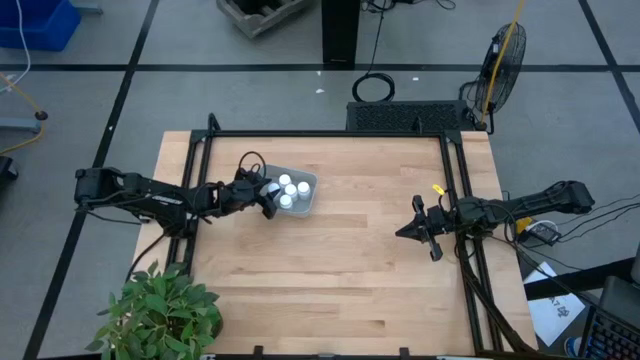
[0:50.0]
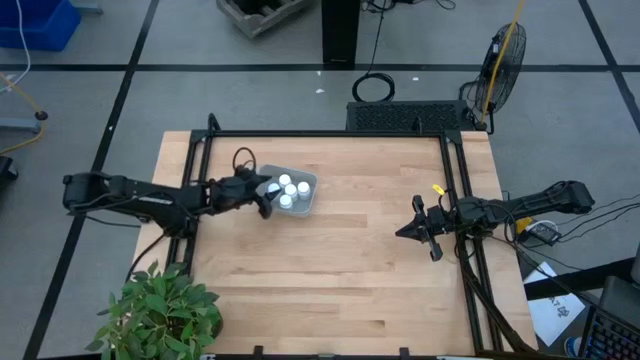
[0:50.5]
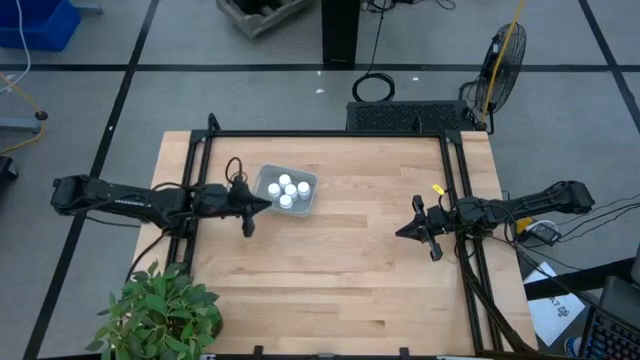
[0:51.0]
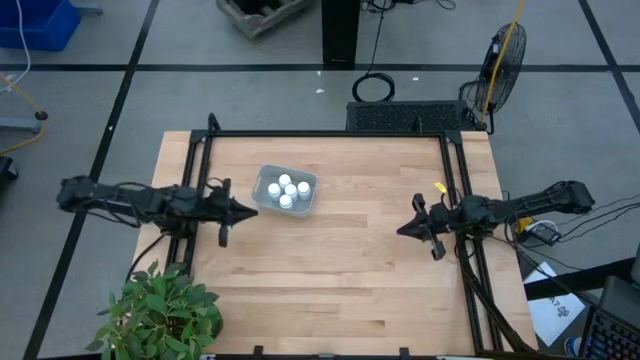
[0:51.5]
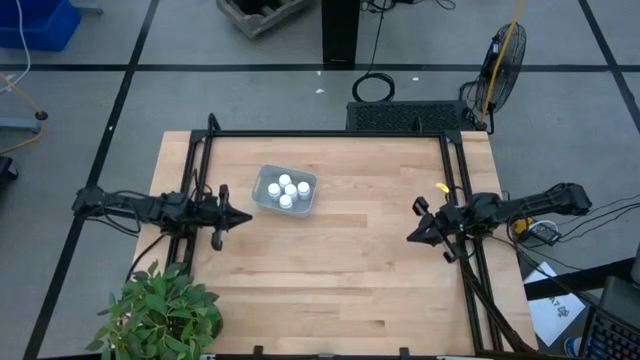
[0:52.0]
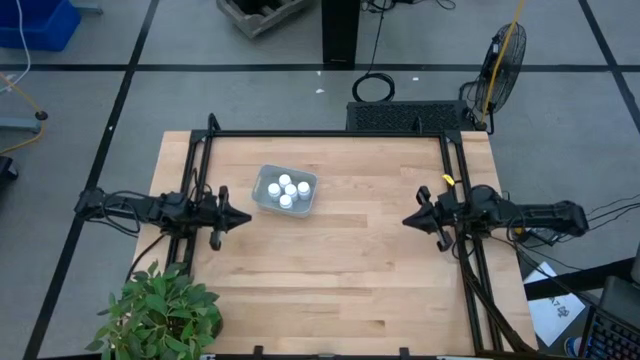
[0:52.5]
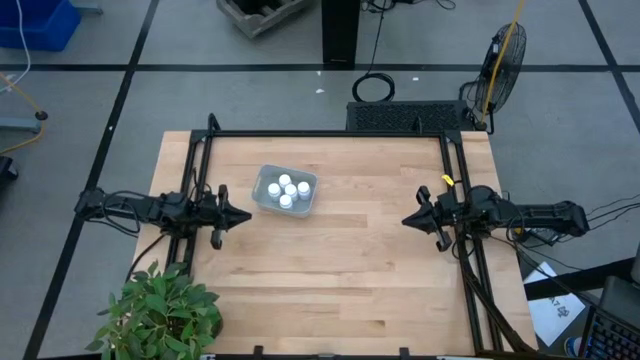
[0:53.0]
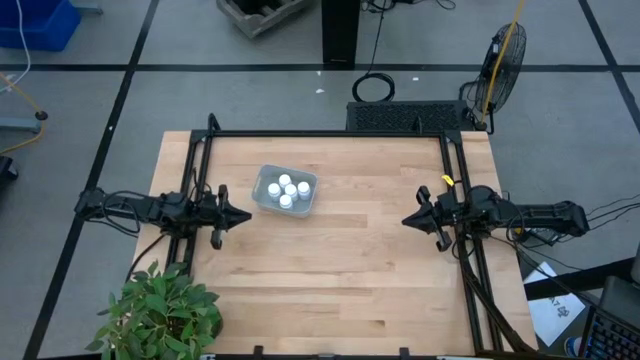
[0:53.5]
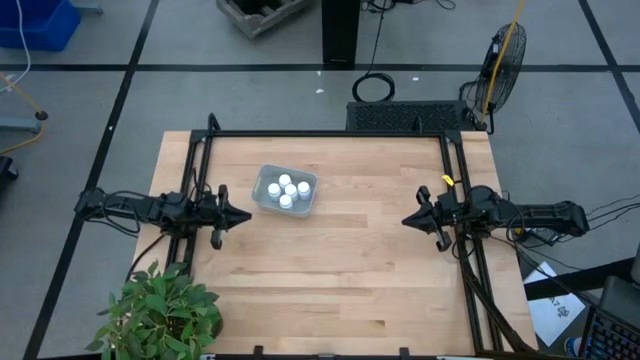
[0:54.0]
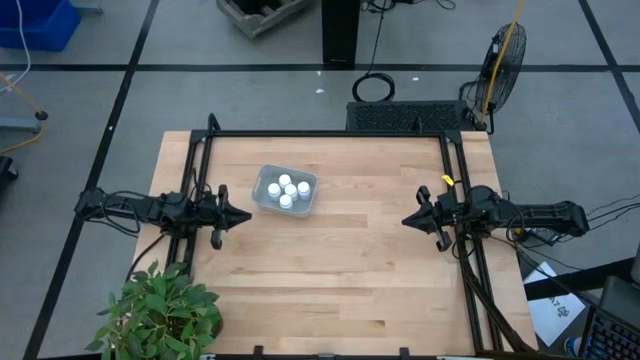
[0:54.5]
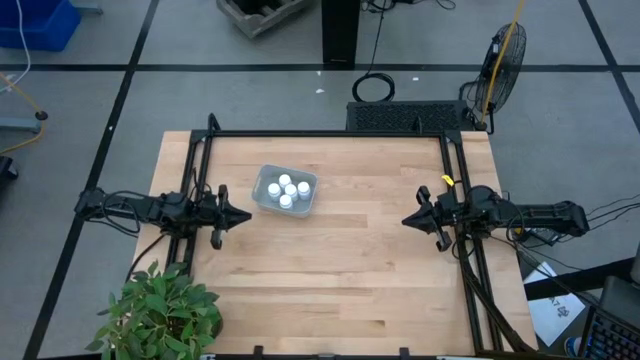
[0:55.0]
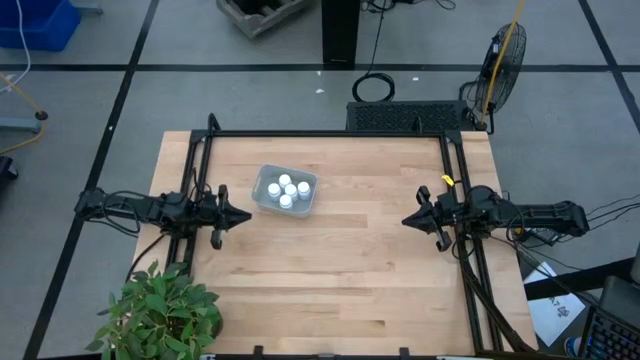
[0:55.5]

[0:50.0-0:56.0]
Task: Pick and place pill bottles into a basket
Return to Home Position

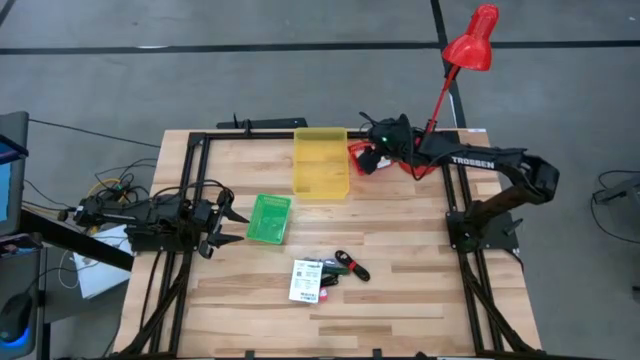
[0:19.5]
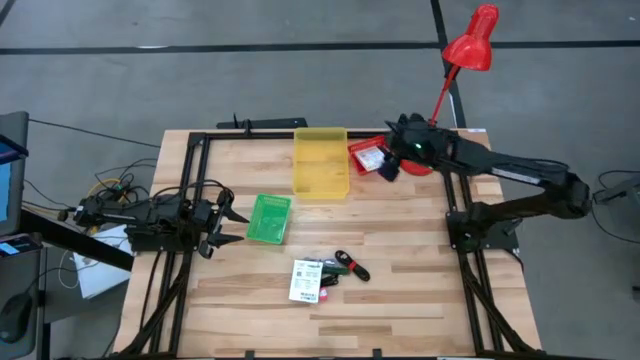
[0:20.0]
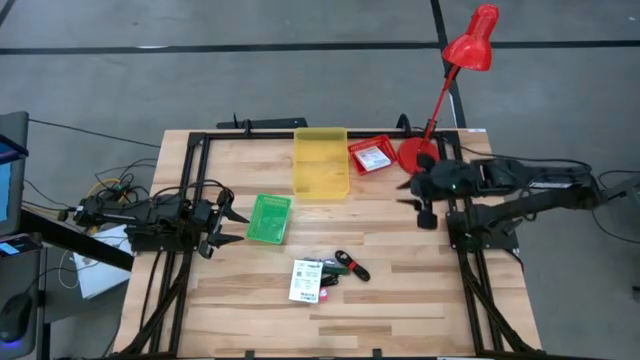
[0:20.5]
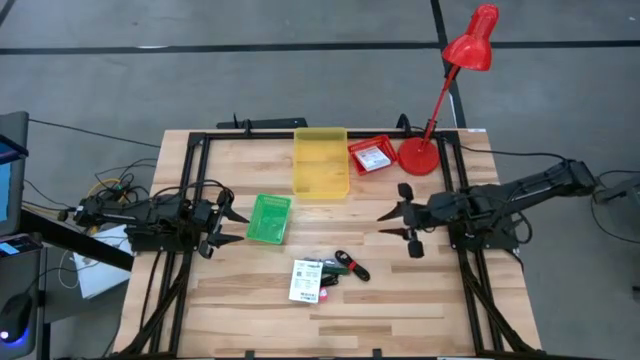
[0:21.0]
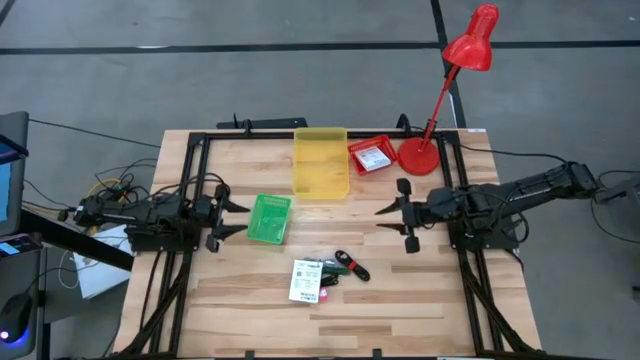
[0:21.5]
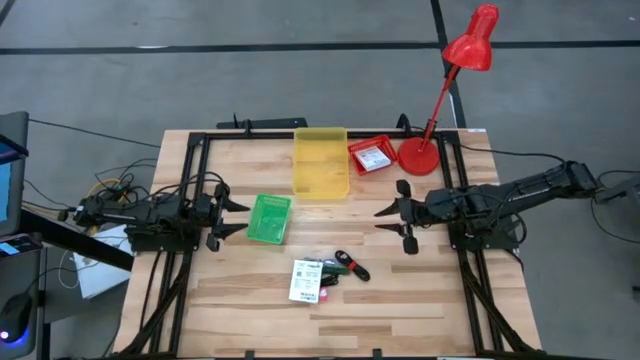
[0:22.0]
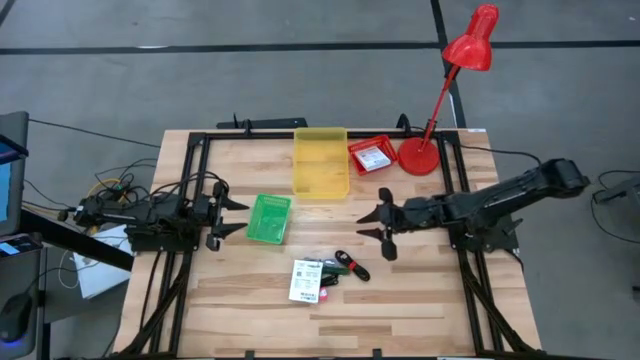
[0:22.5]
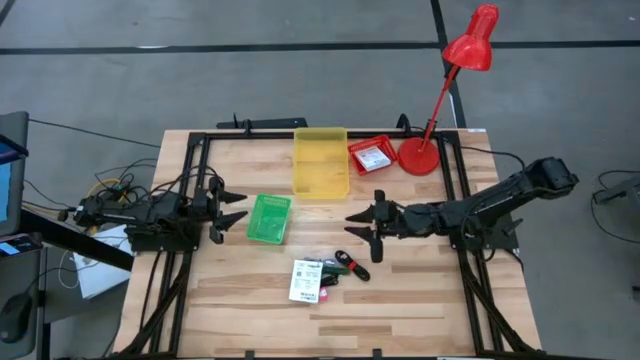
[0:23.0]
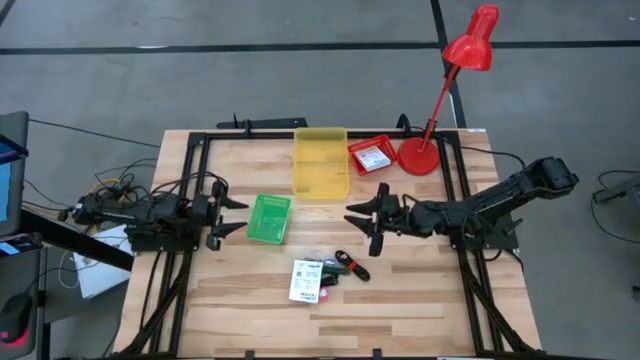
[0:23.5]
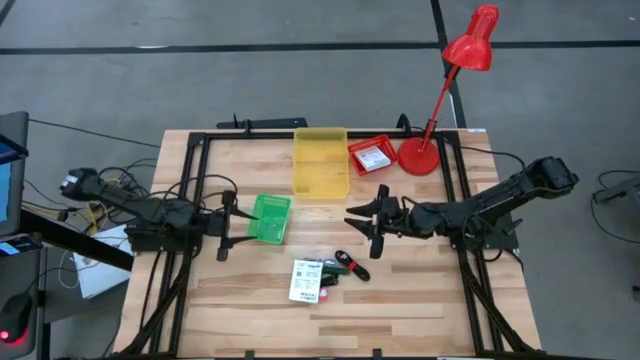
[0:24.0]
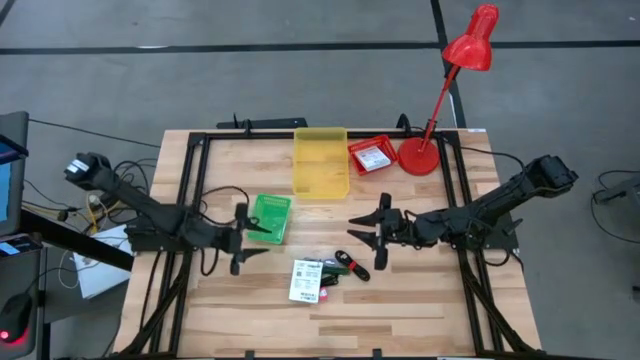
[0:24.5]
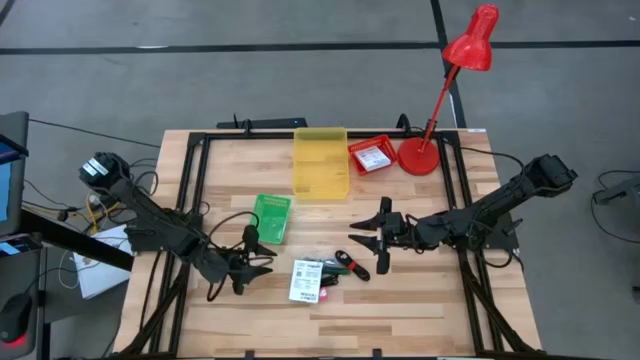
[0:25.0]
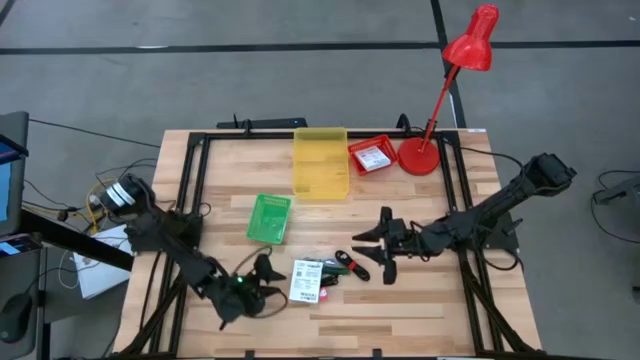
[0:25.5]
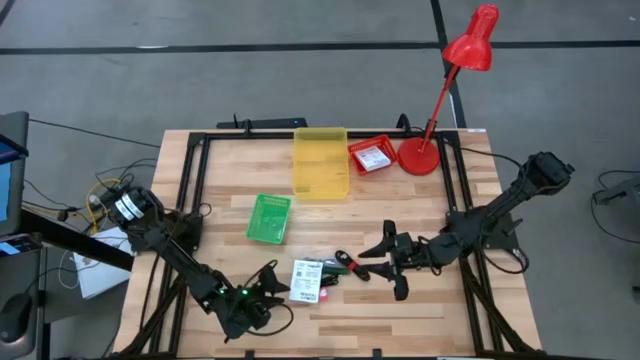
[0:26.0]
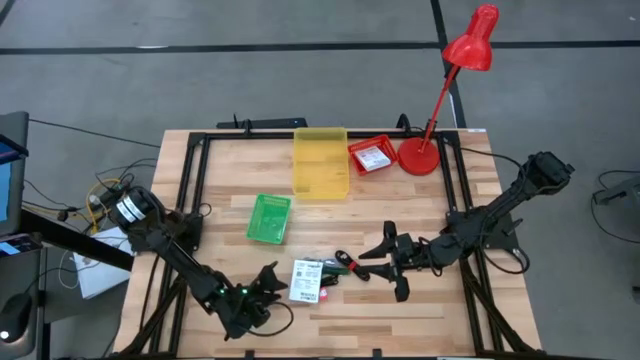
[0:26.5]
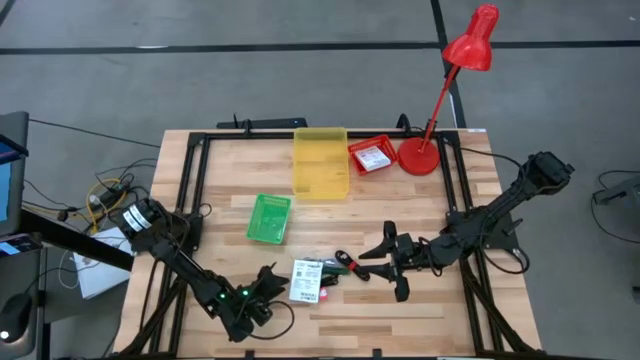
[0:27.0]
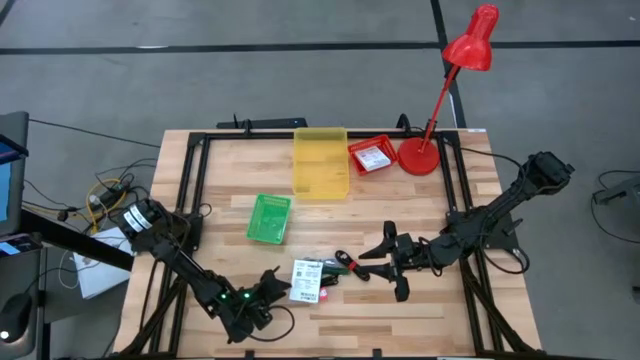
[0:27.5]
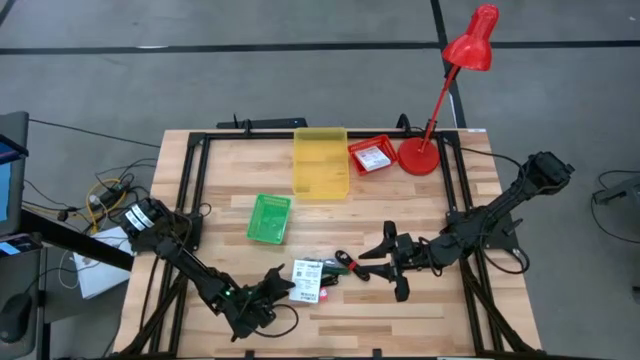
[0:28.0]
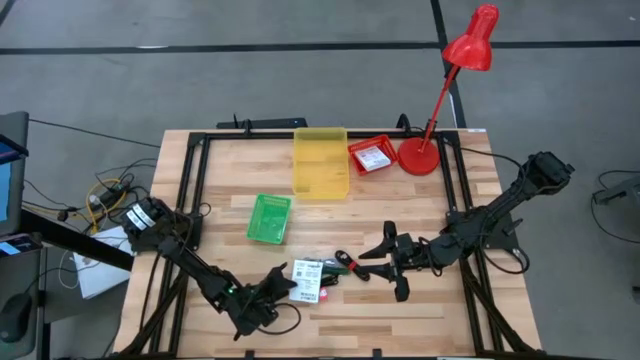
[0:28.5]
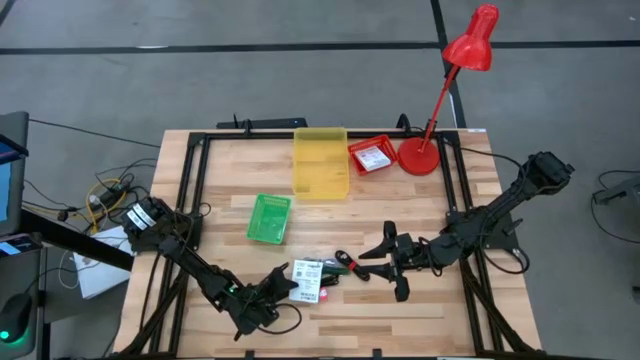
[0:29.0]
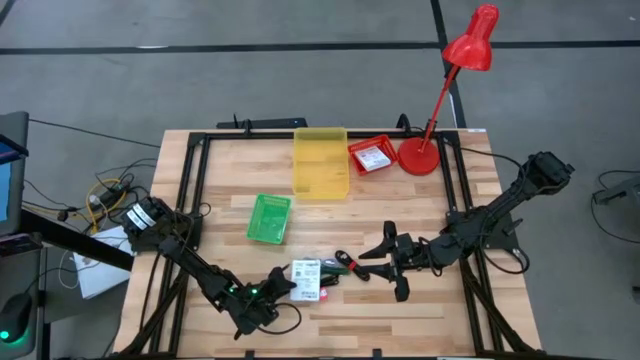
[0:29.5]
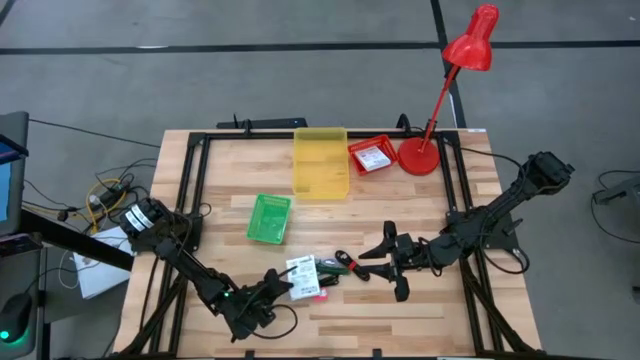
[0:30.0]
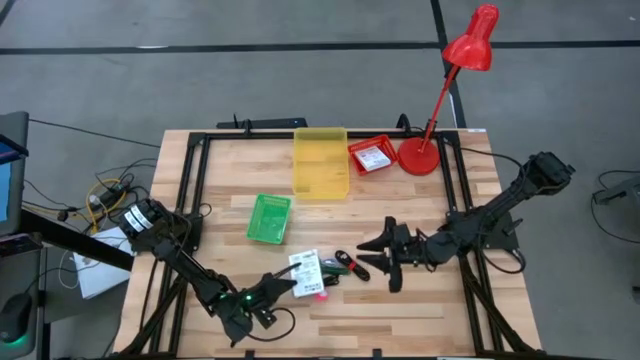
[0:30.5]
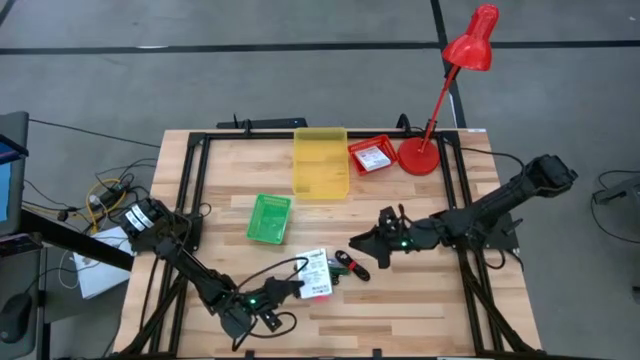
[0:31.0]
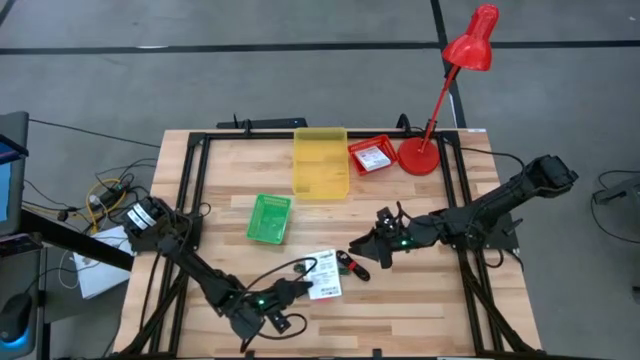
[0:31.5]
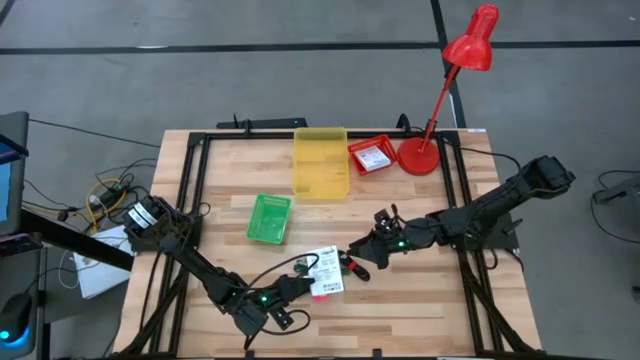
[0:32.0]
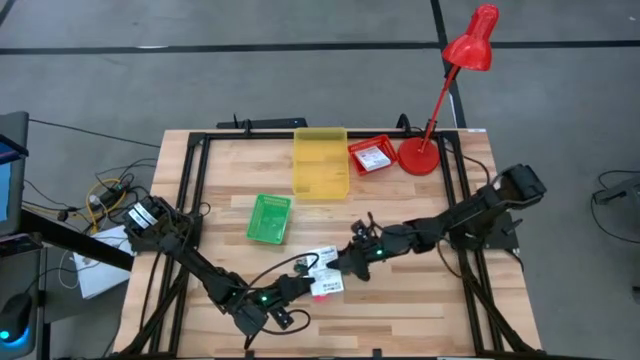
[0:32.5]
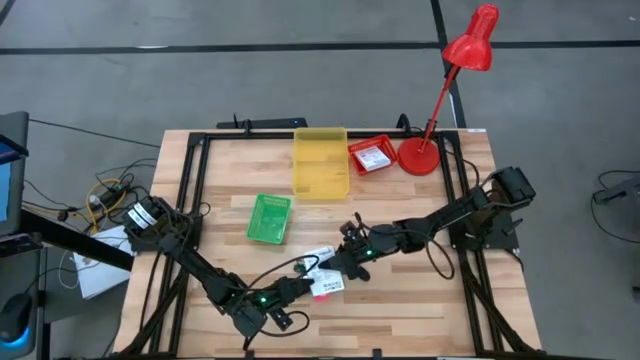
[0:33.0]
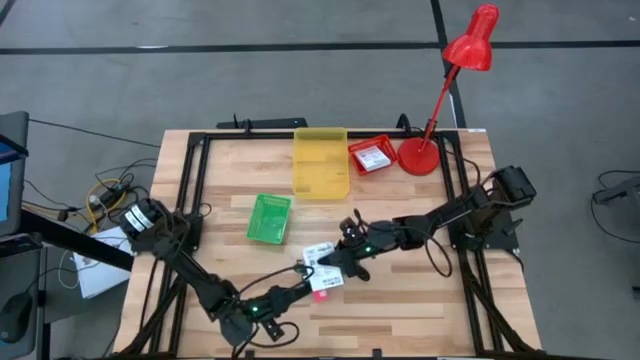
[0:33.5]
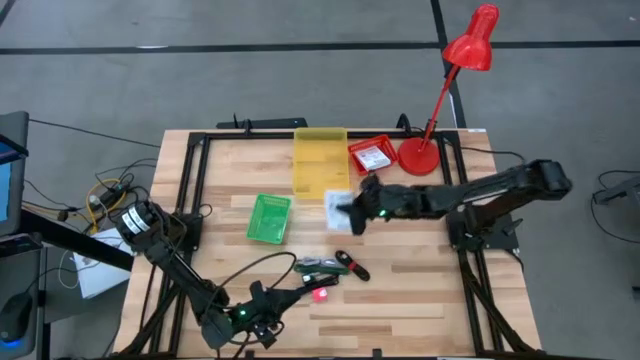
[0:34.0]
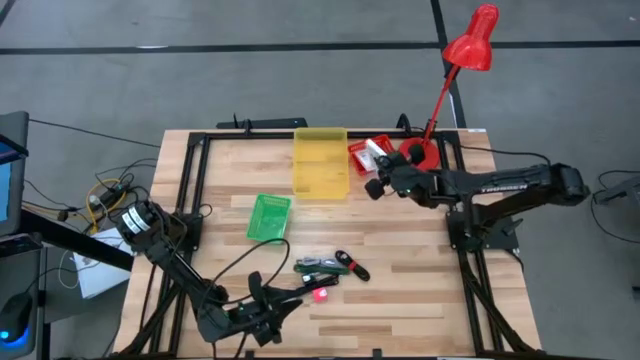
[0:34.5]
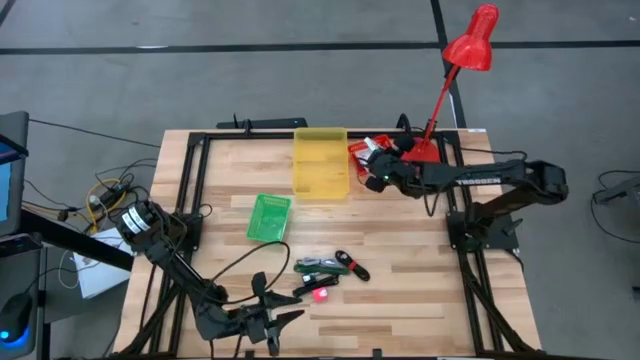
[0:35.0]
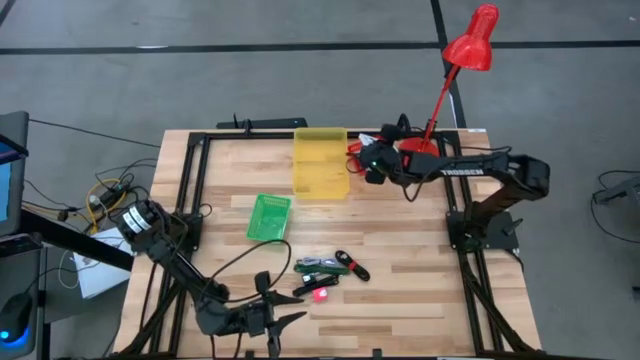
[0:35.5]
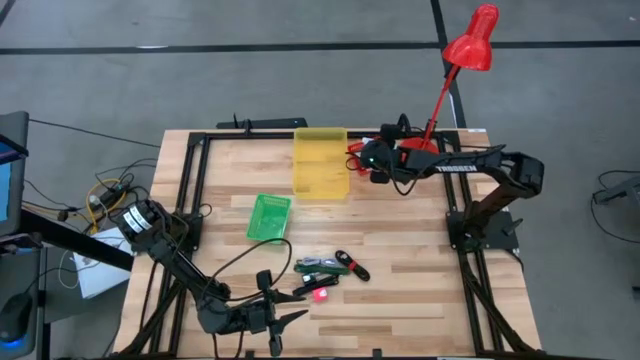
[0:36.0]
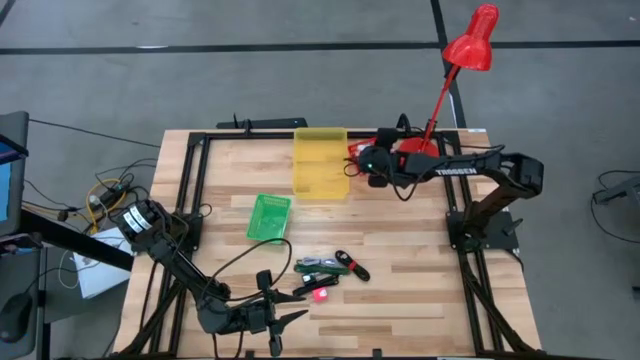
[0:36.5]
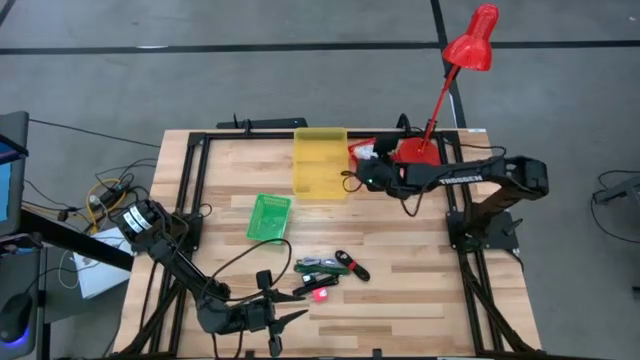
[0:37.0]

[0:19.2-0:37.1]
Task: Pick and place items into bin
Put the white card reader box into the red bin
